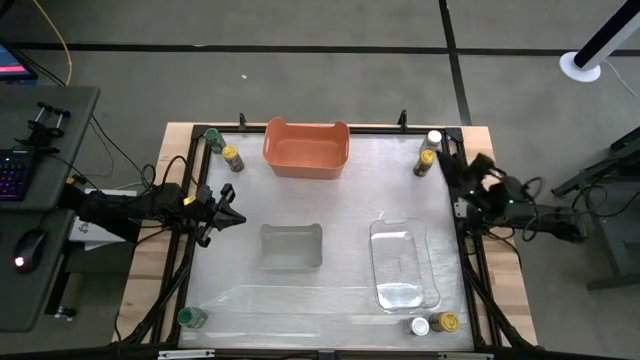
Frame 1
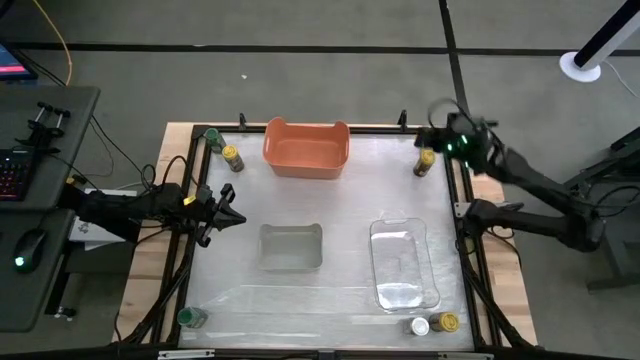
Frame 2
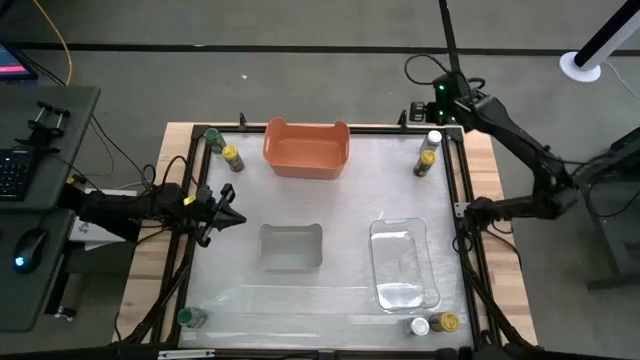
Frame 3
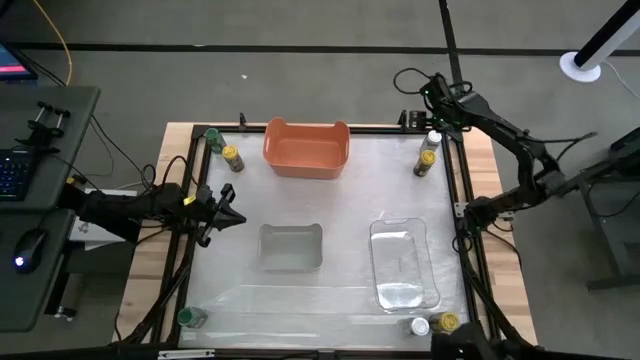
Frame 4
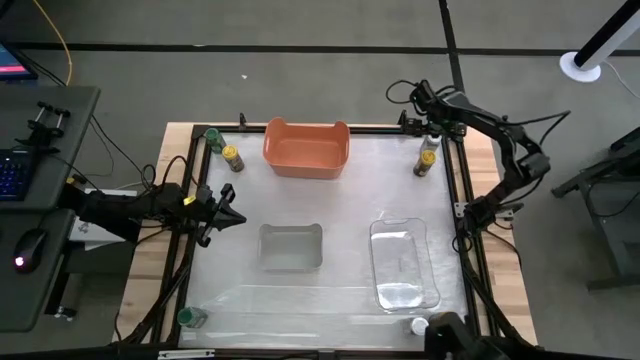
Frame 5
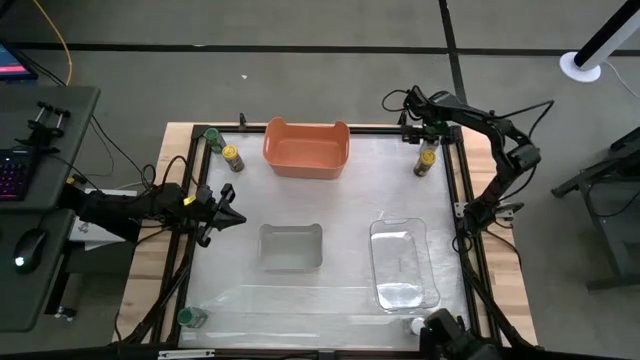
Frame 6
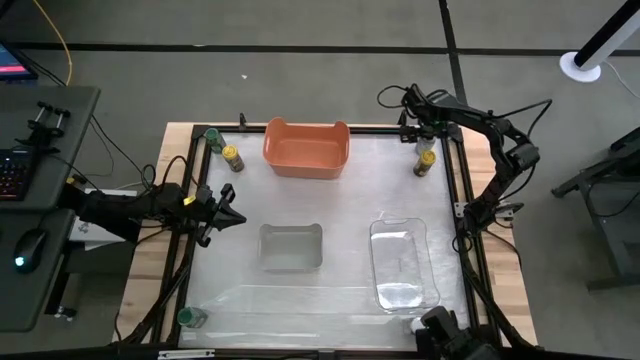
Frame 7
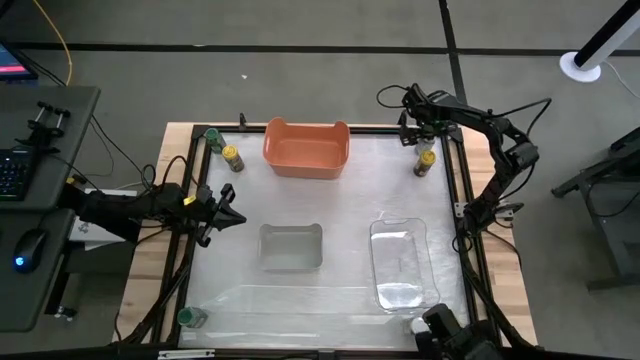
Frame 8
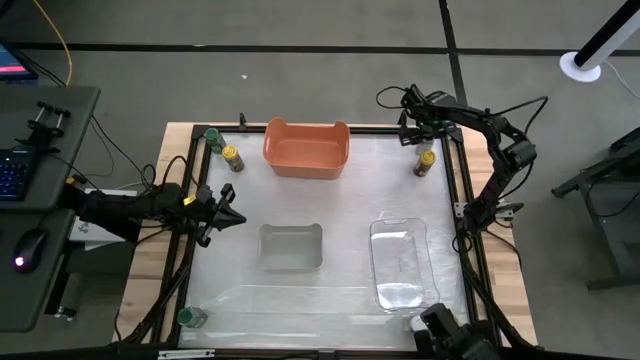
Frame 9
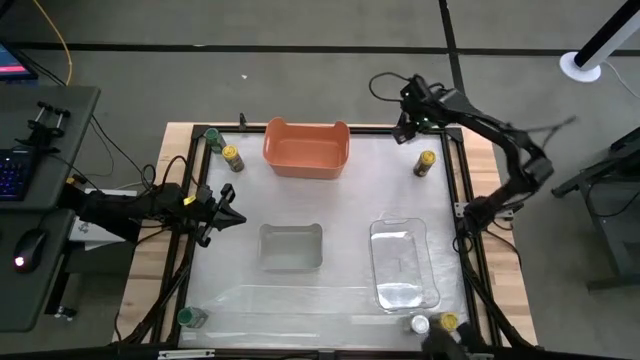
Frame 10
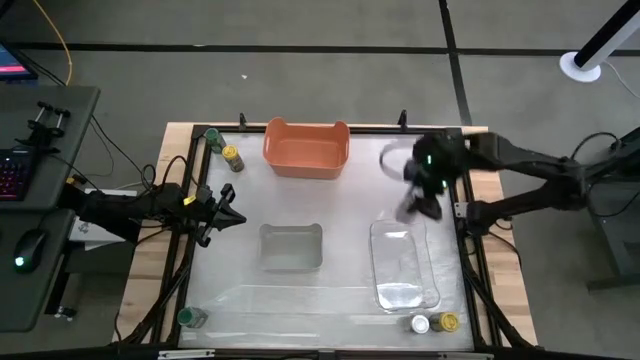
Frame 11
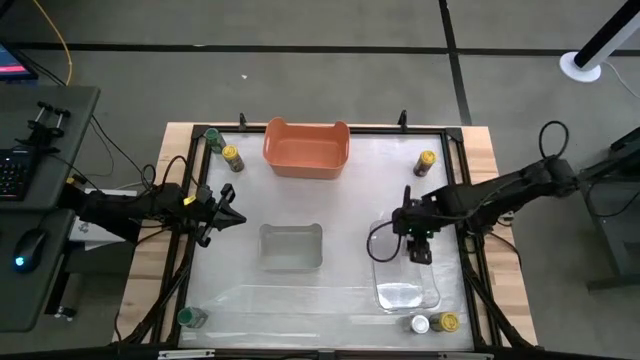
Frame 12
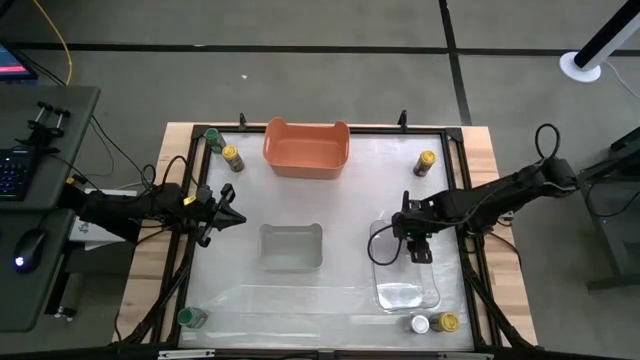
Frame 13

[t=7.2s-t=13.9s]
Task: Sort spices by type
Put the top white seasoning bottle into the transparent bin

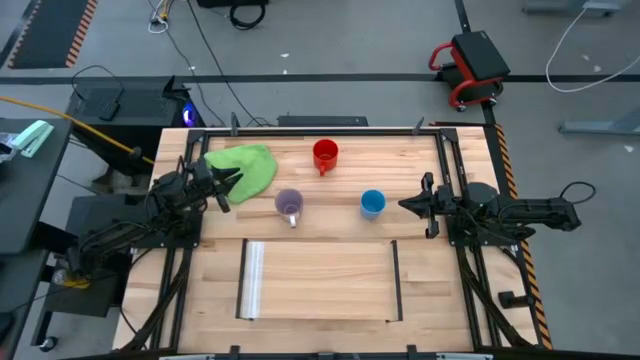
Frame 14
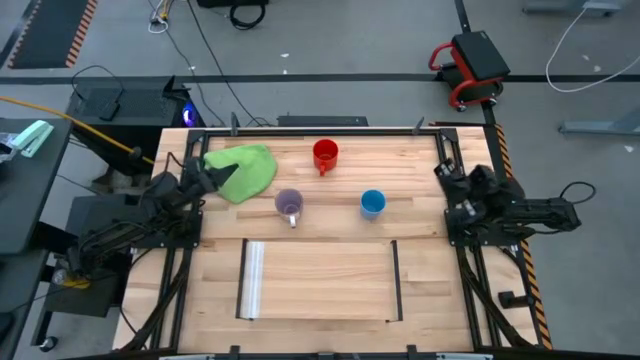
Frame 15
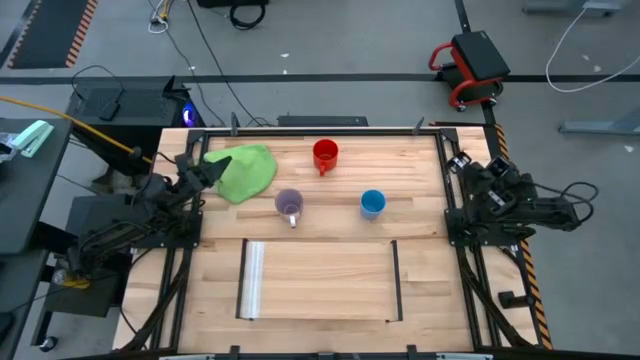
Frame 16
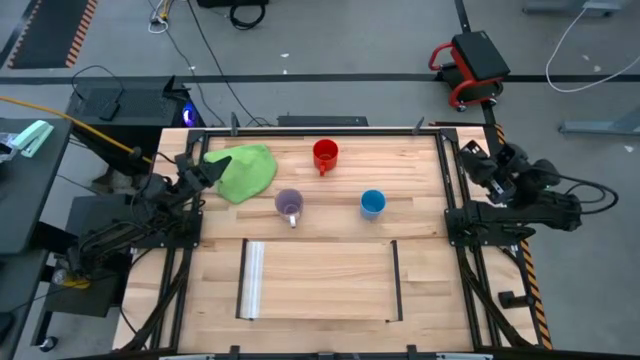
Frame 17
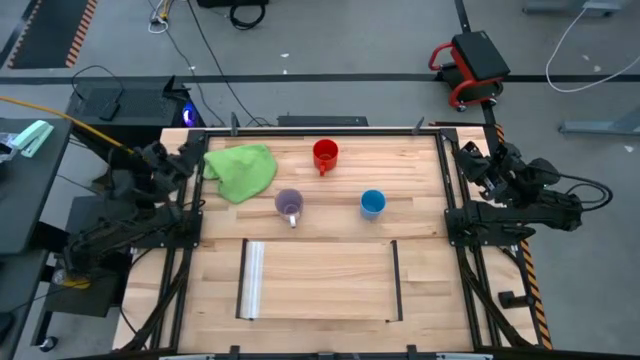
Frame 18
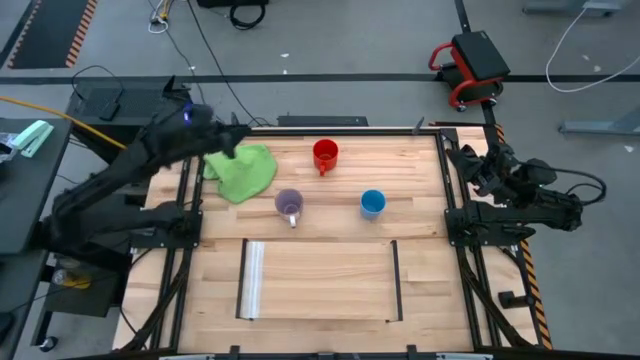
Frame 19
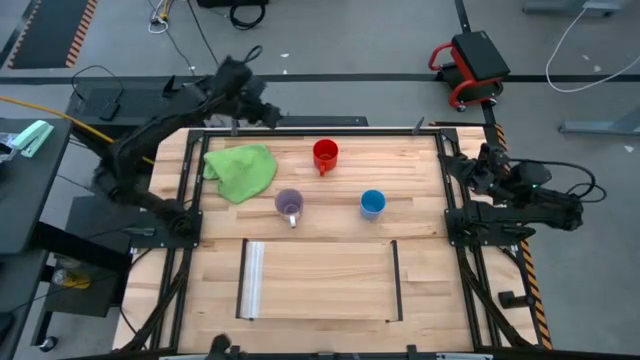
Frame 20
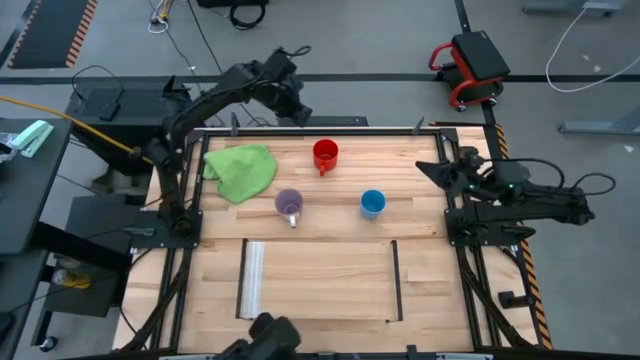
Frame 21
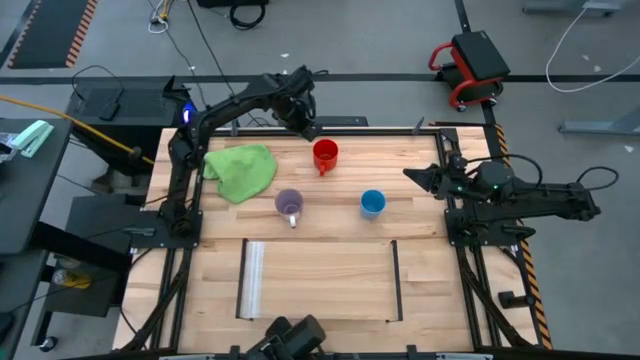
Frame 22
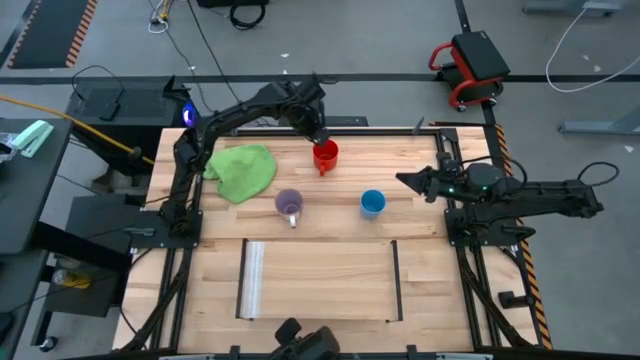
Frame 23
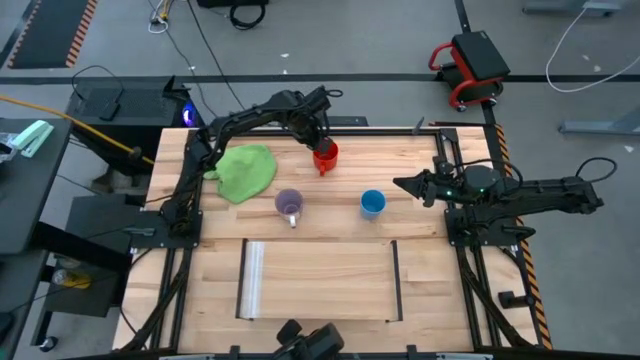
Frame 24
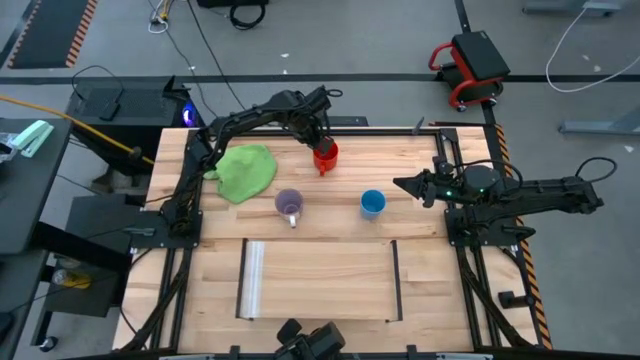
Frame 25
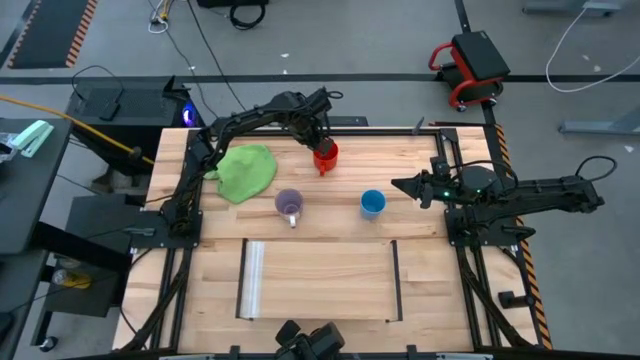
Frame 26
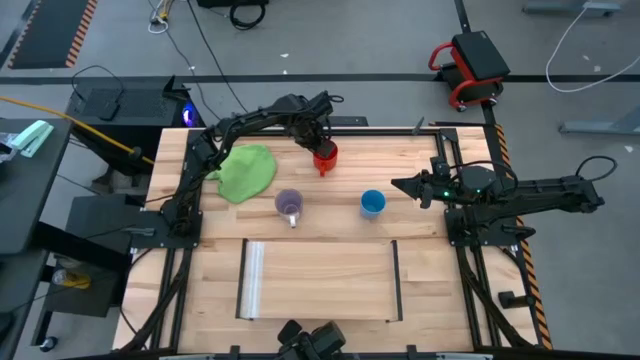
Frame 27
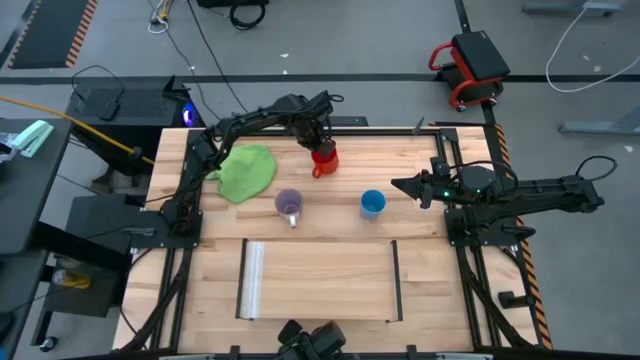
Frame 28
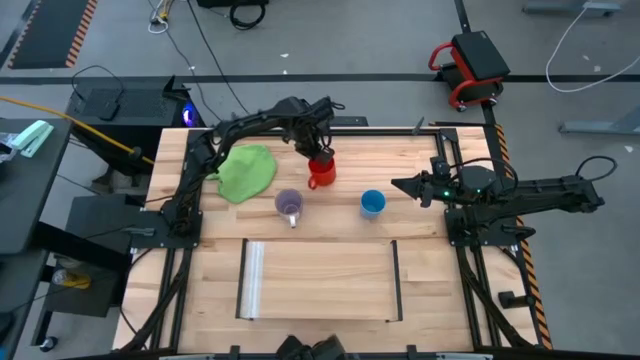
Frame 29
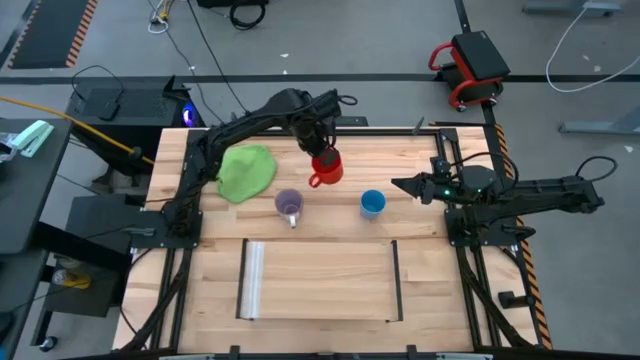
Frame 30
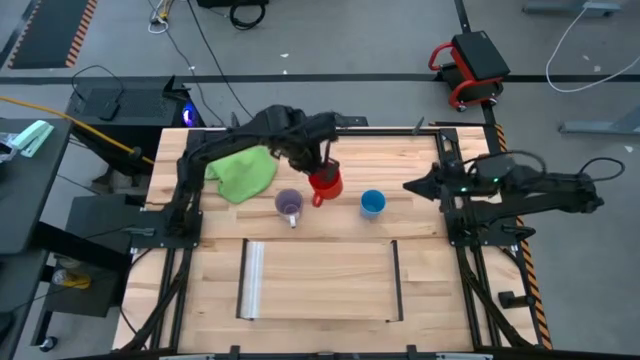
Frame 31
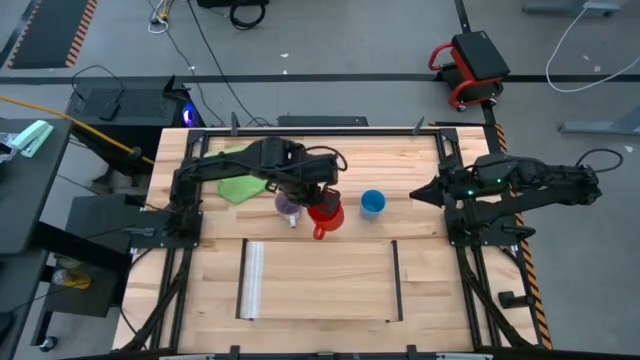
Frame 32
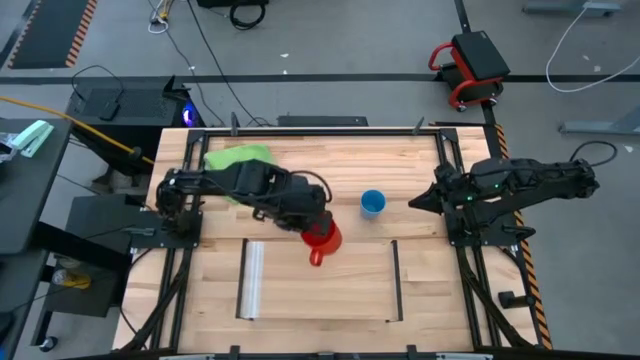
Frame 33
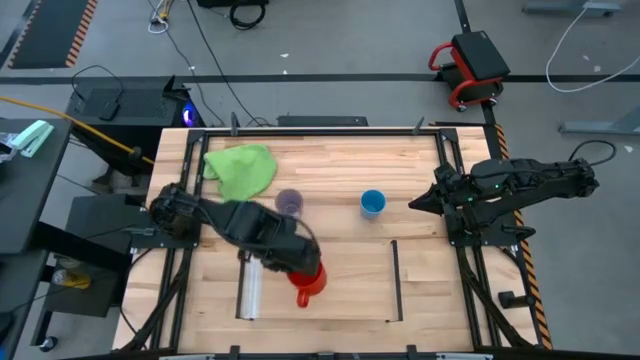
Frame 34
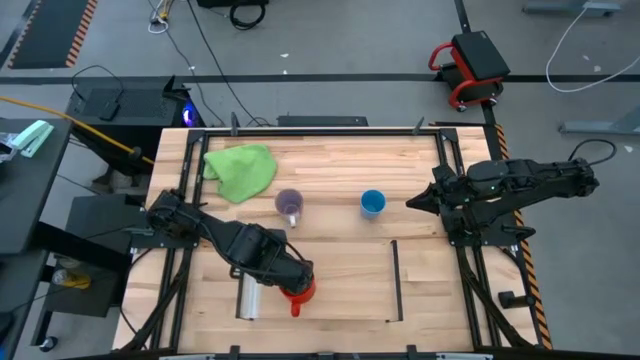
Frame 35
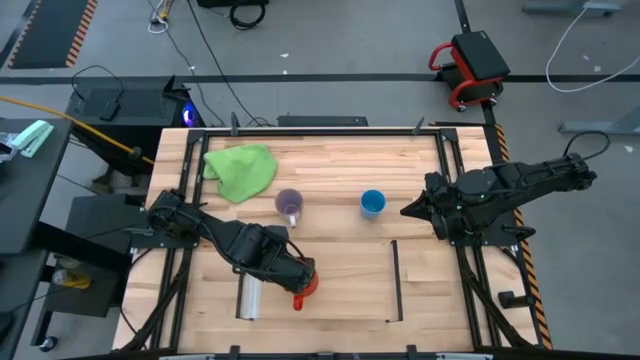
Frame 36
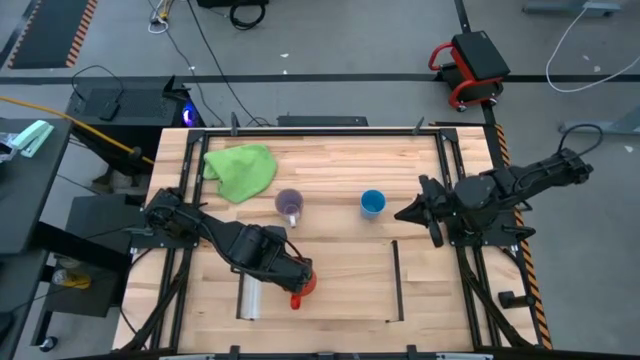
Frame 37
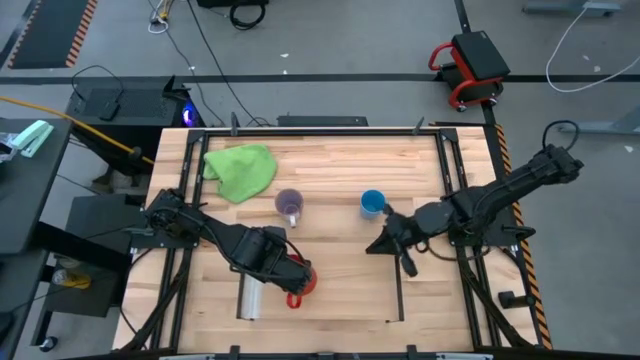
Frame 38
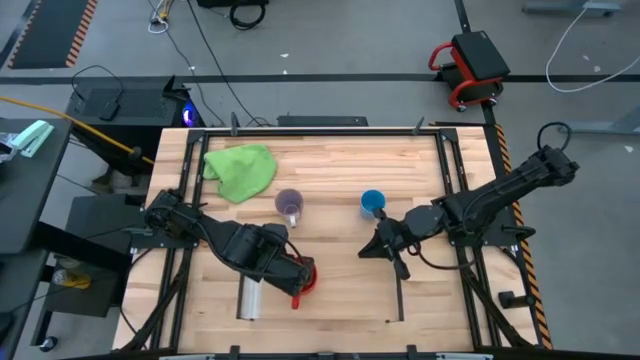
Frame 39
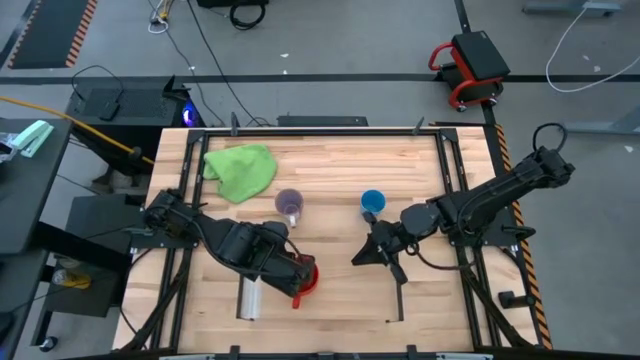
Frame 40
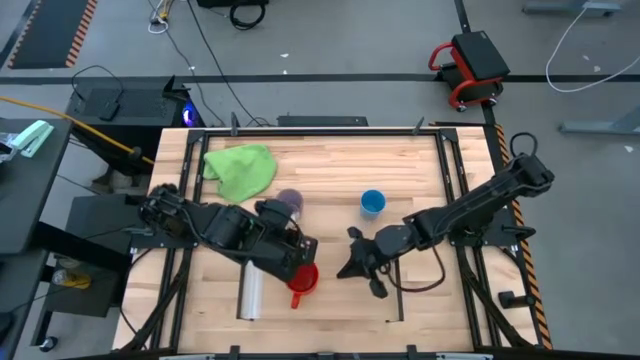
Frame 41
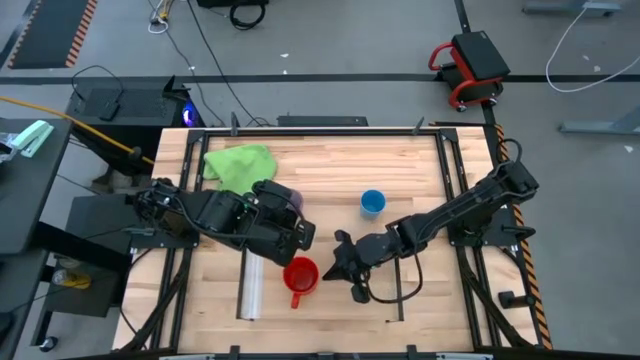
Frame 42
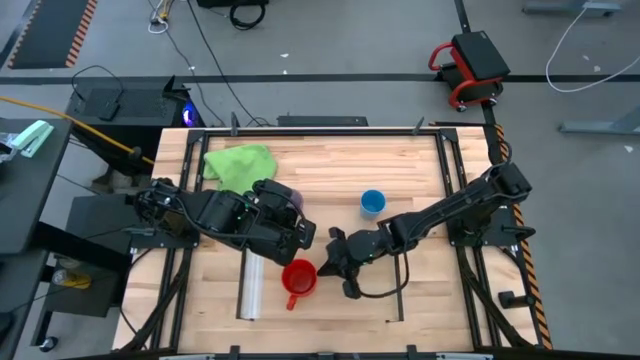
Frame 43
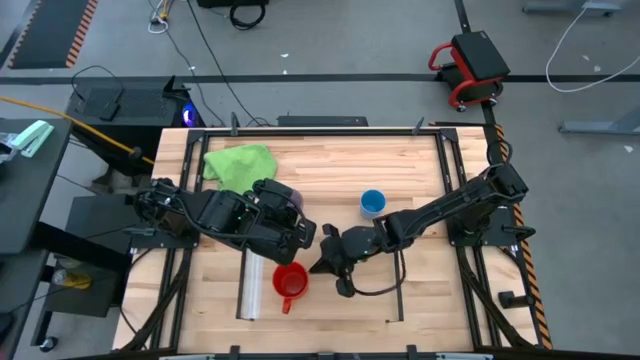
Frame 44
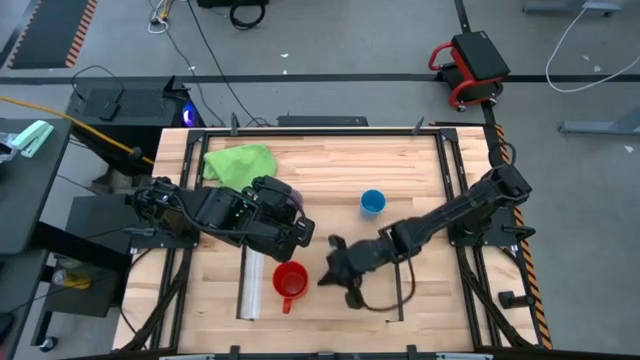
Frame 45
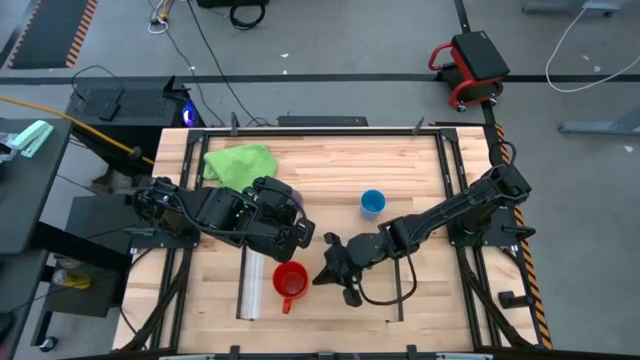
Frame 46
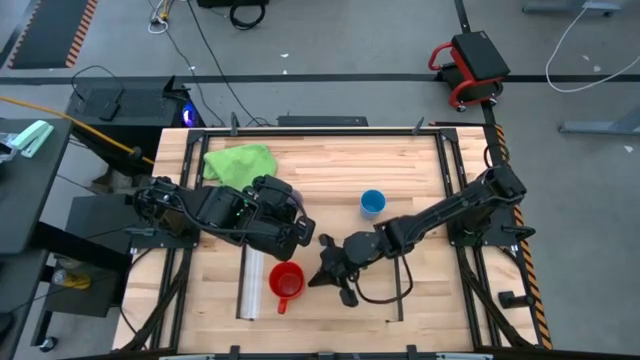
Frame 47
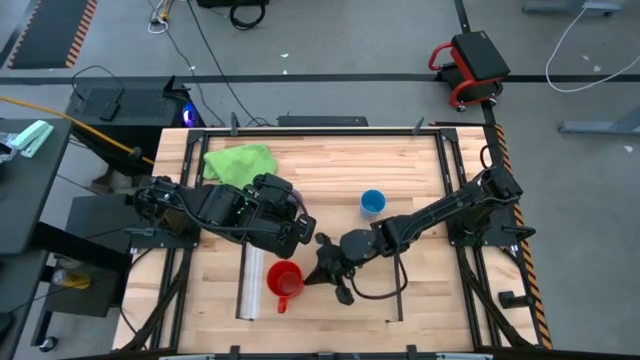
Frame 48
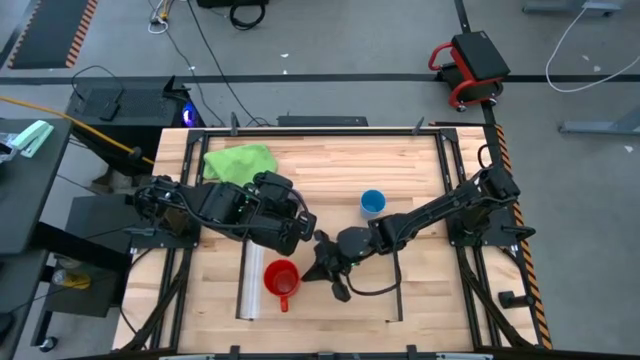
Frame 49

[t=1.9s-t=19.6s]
Task: Stack small to large cups/mugs on shelf
Put the red mug on the shelf
